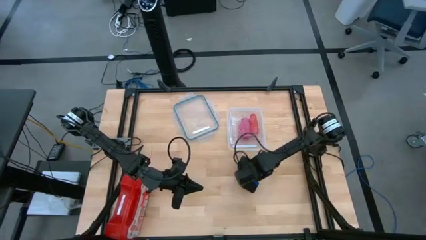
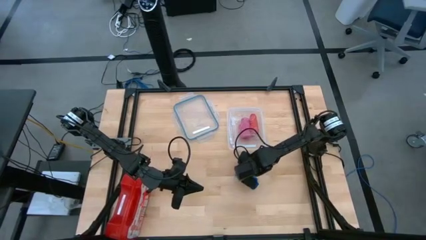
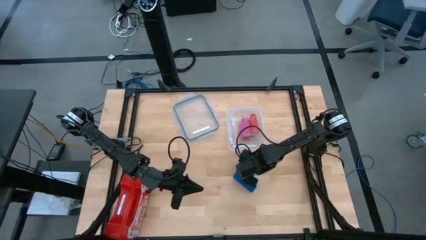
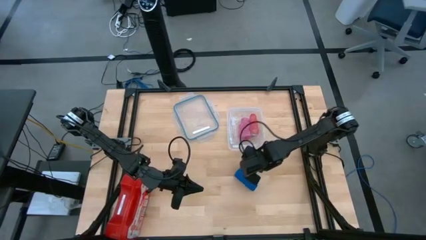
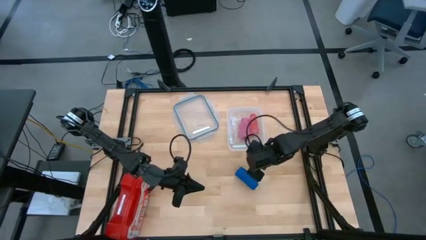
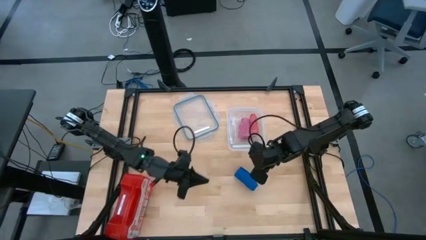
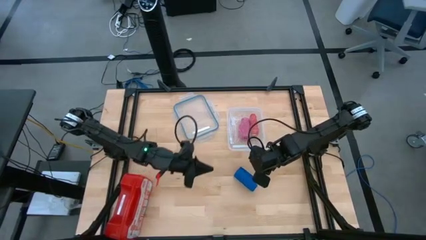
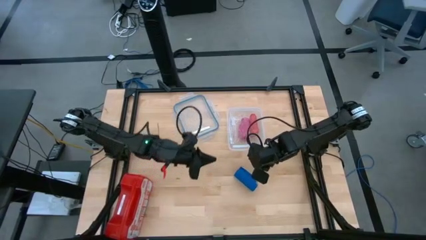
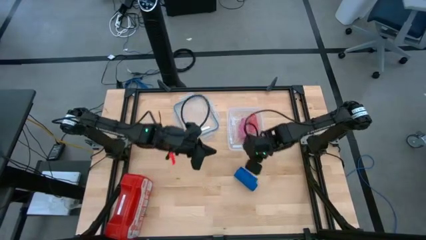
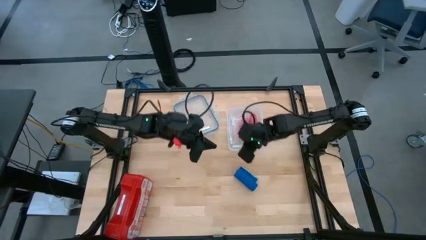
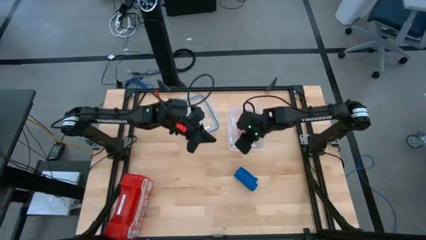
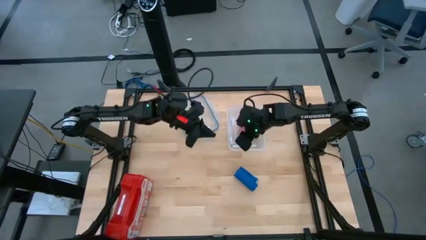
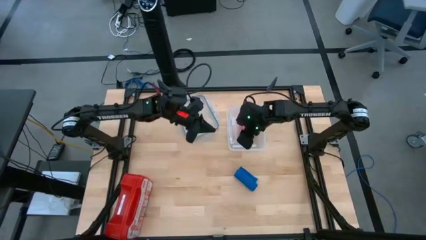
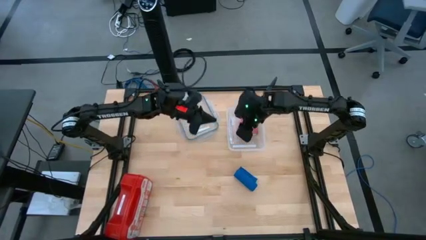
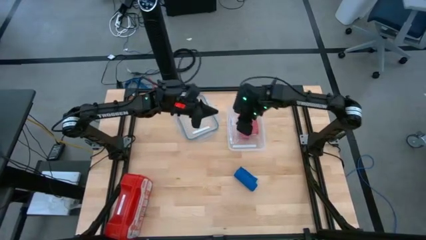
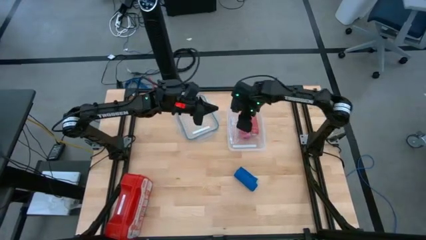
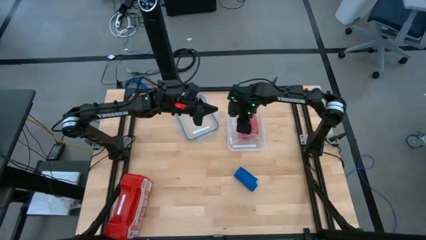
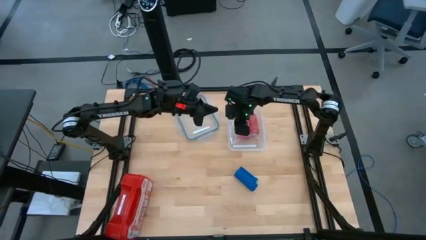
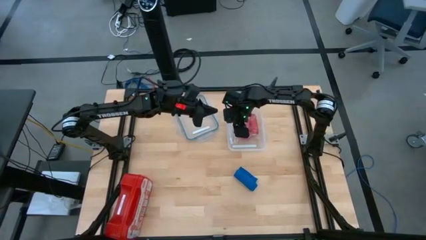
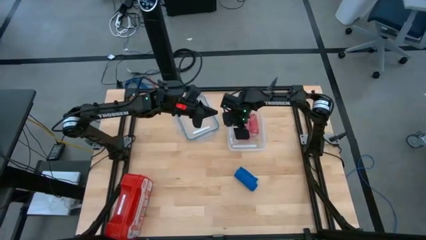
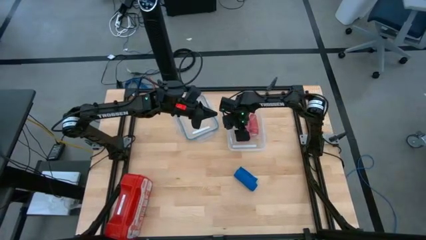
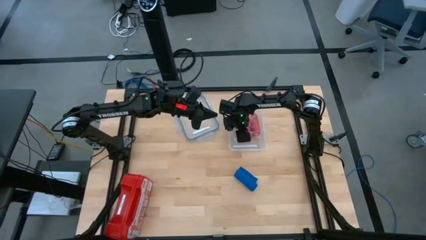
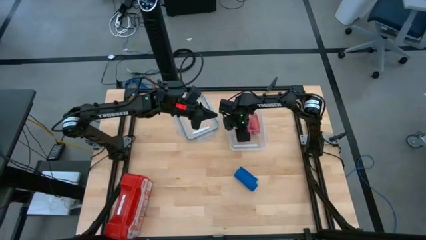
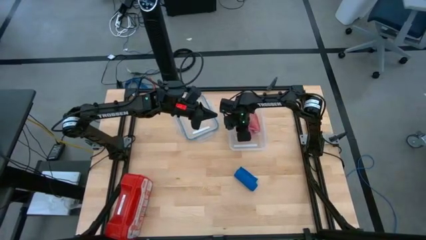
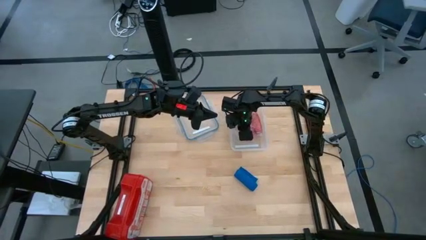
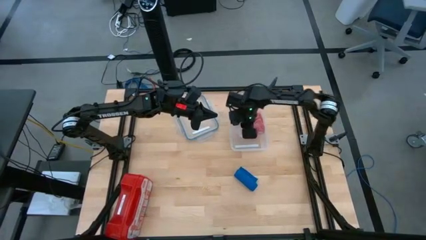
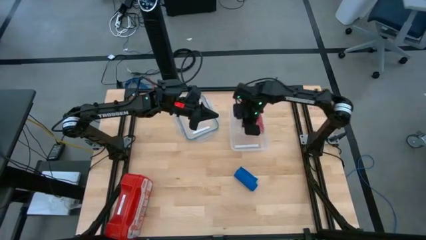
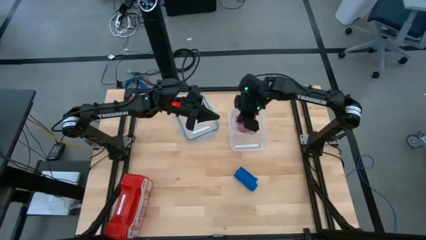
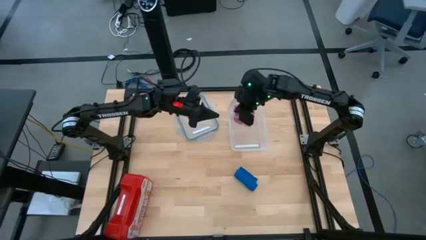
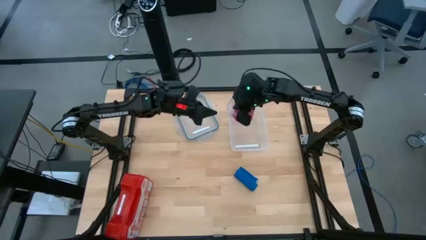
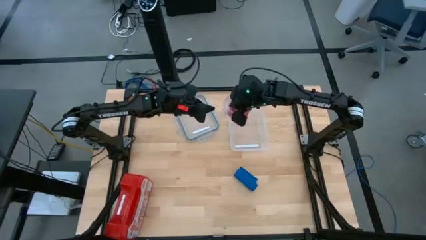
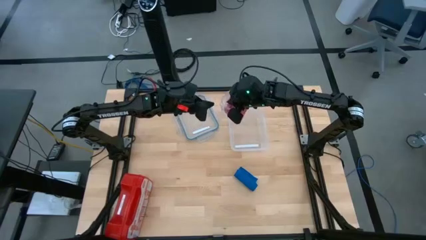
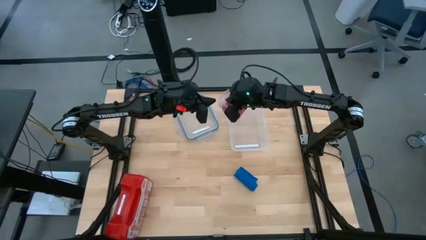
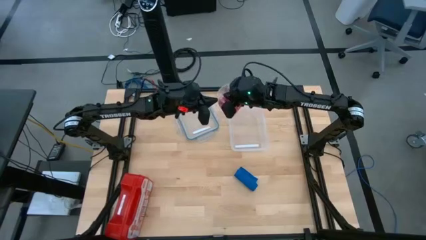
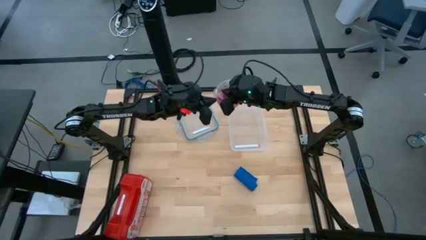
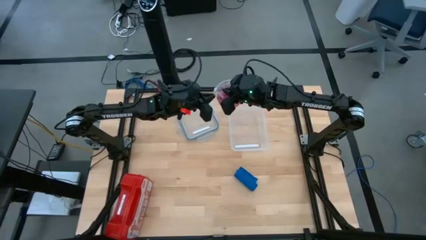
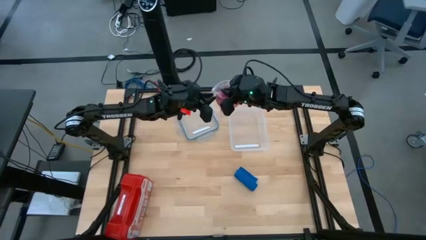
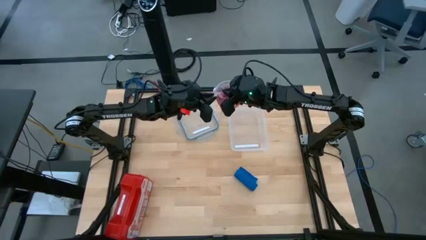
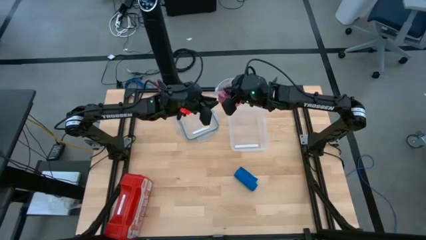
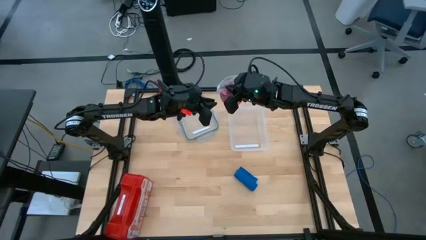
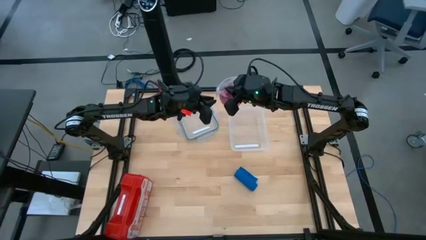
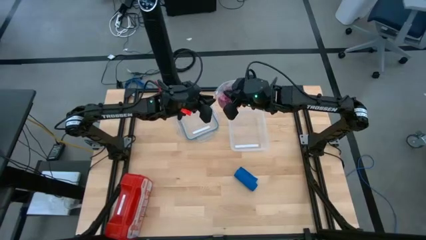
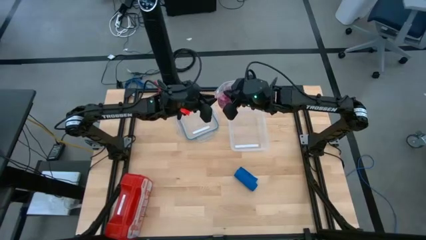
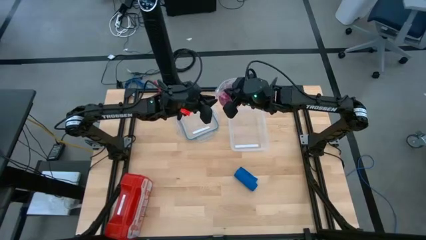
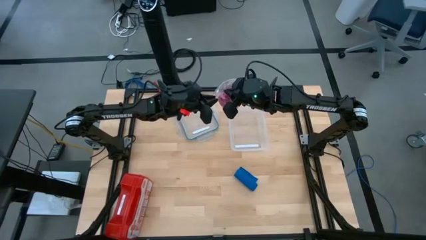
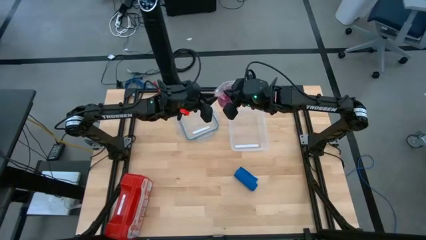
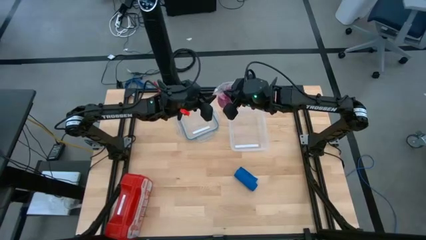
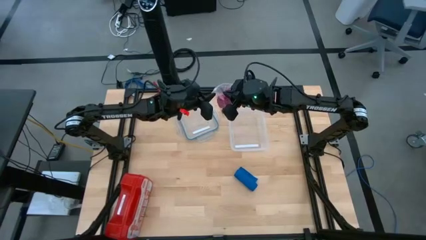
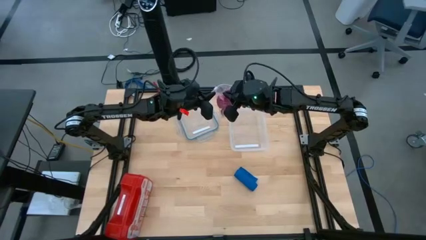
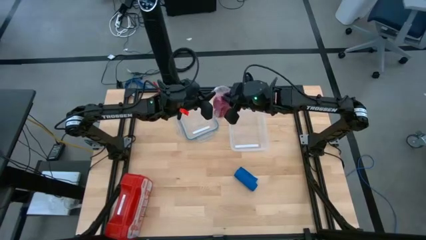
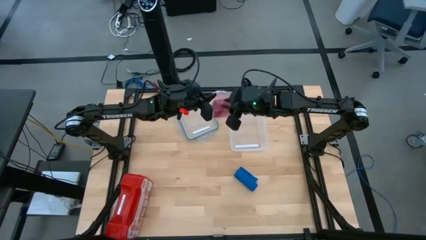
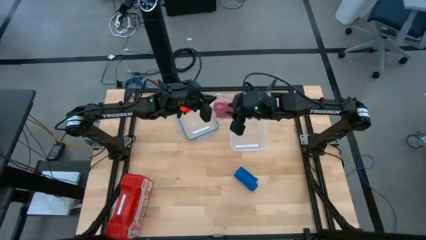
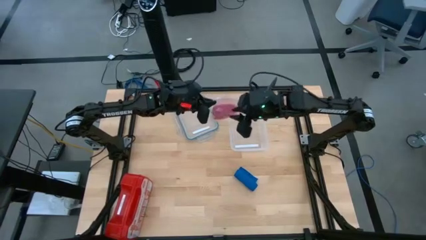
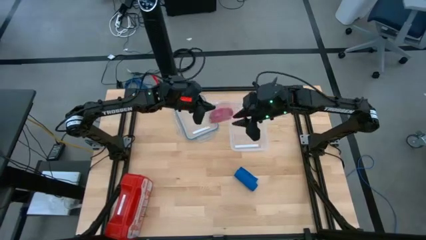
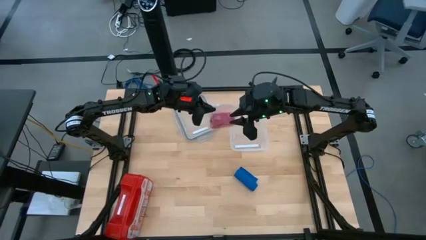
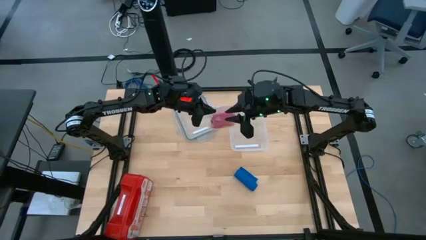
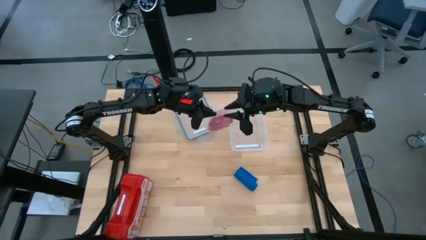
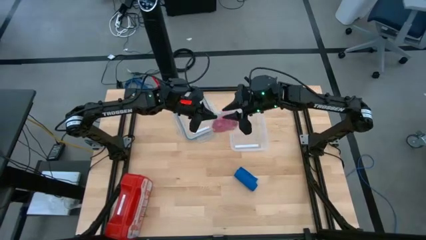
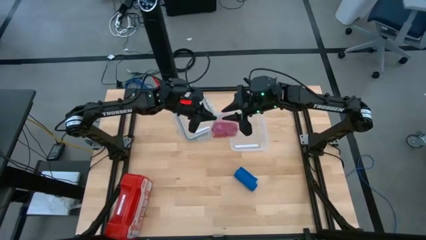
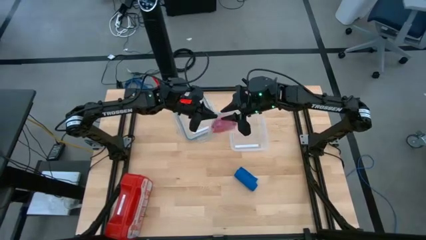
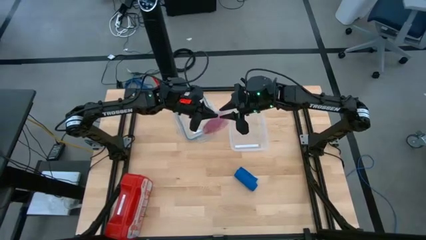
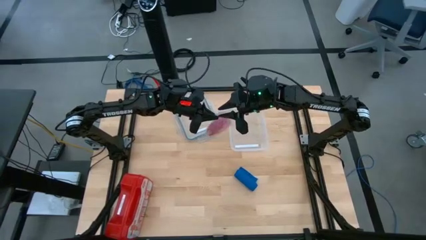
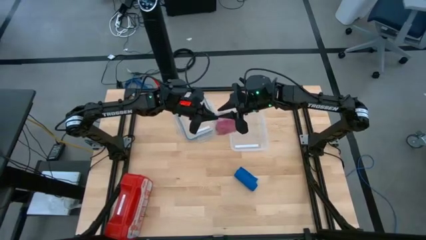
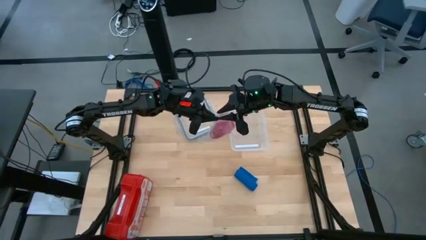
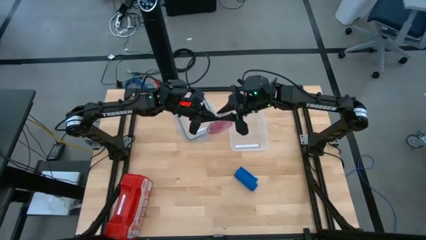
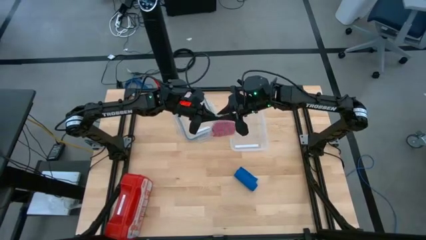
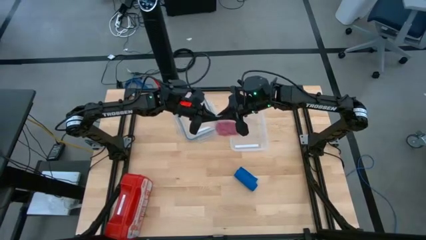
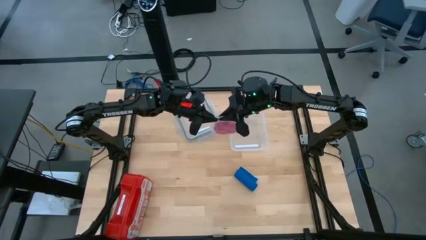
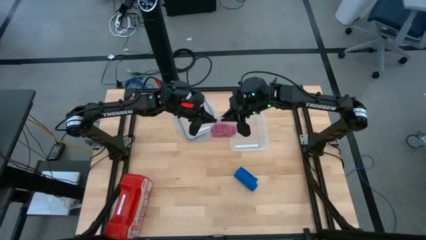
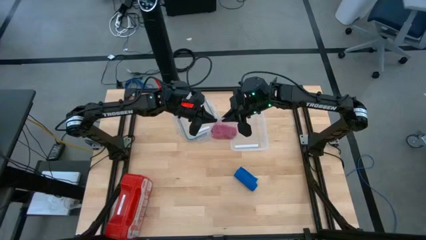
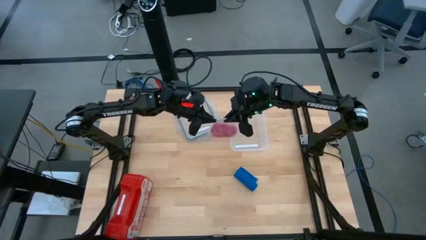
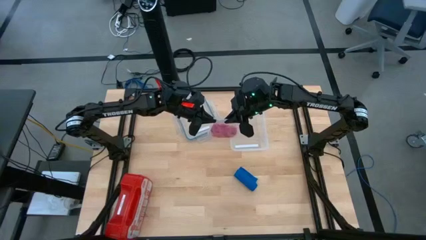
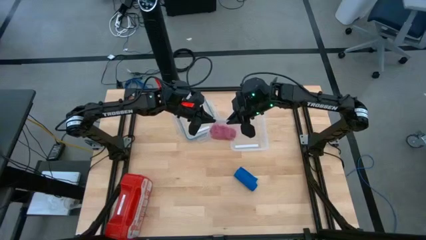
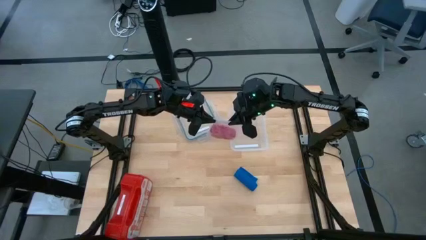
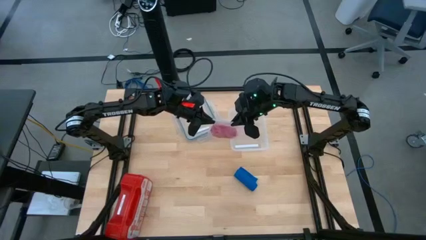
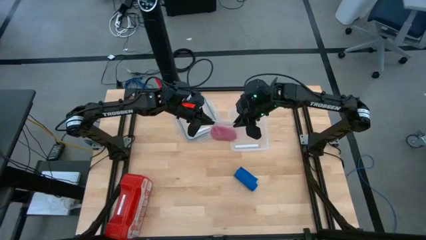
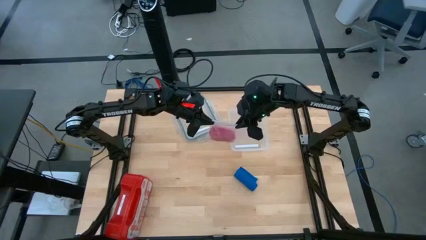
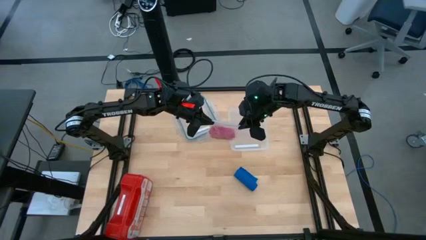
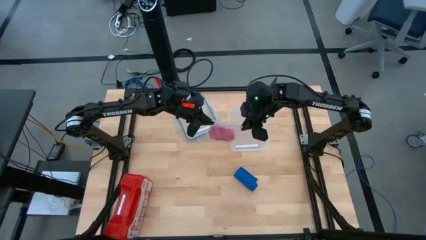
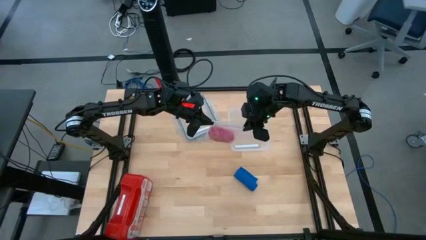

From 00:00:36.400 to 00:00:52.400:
Task: Roll bandage
Open the transparent zip bag
